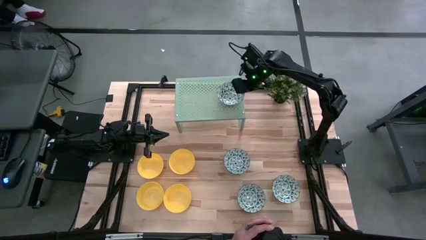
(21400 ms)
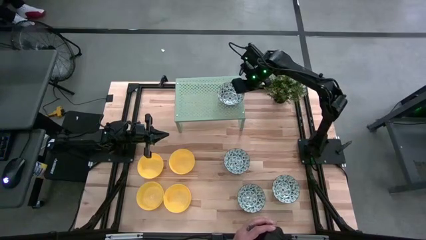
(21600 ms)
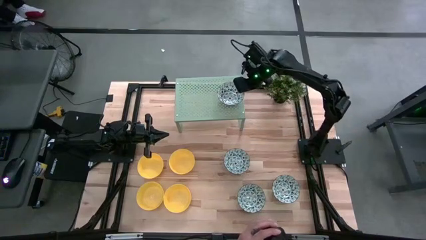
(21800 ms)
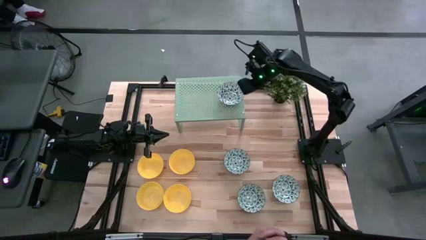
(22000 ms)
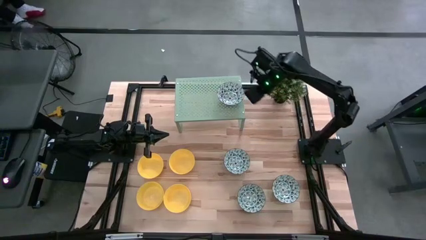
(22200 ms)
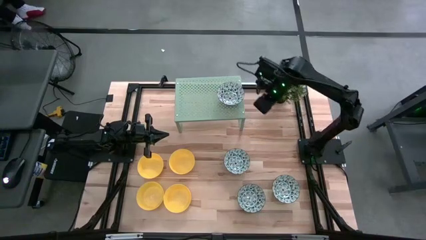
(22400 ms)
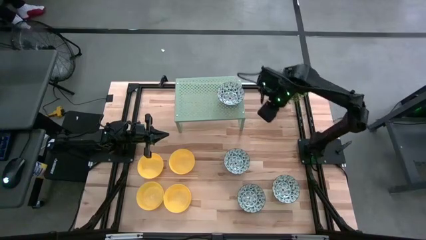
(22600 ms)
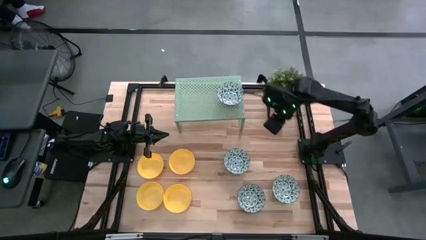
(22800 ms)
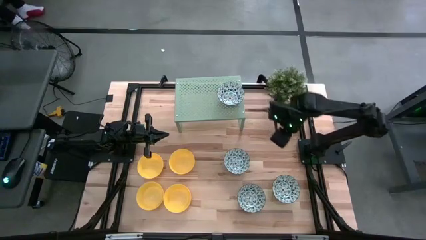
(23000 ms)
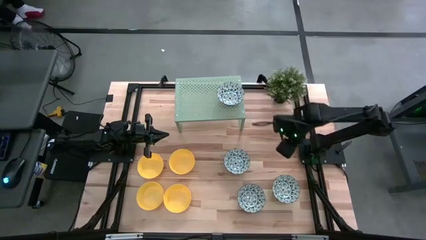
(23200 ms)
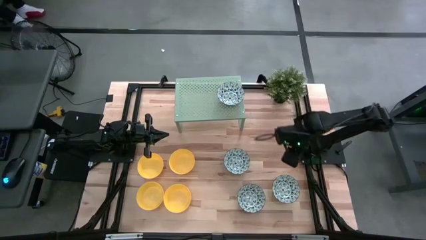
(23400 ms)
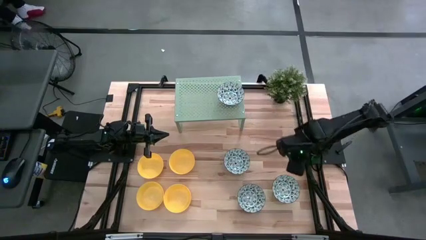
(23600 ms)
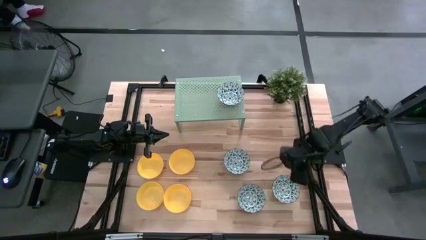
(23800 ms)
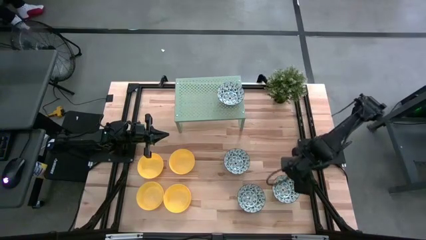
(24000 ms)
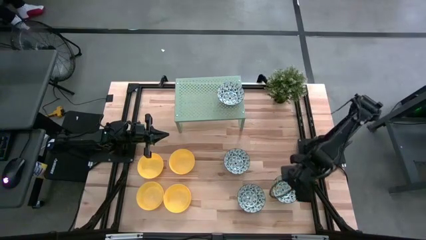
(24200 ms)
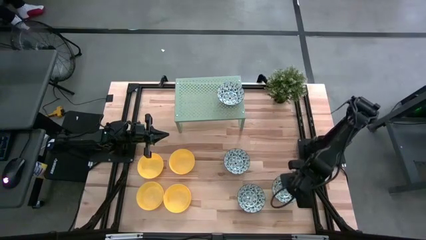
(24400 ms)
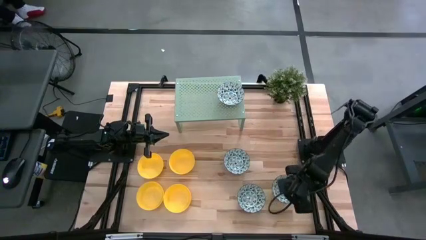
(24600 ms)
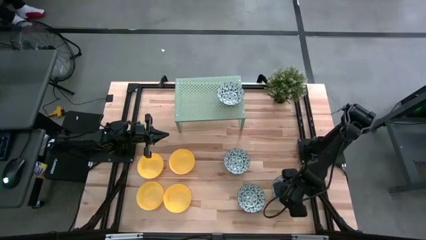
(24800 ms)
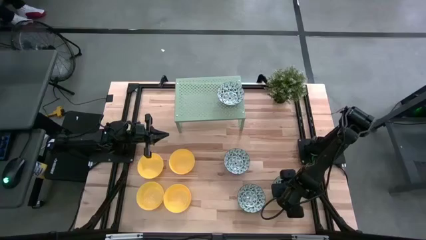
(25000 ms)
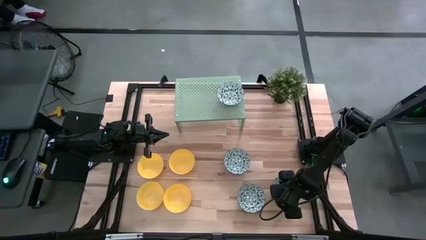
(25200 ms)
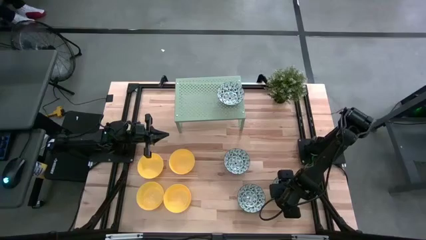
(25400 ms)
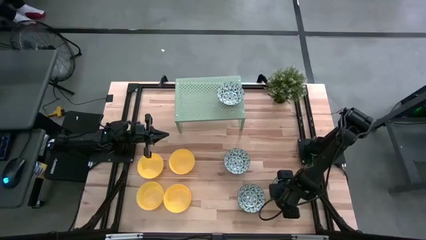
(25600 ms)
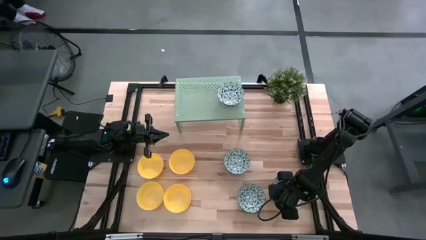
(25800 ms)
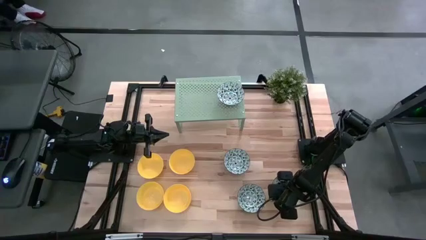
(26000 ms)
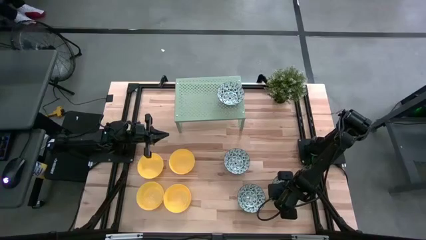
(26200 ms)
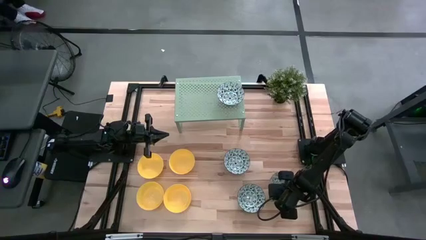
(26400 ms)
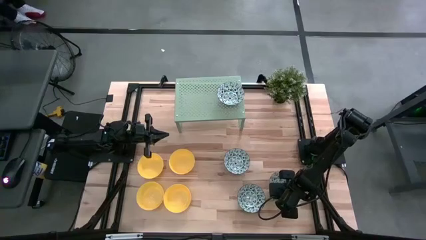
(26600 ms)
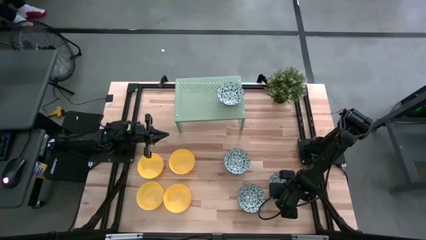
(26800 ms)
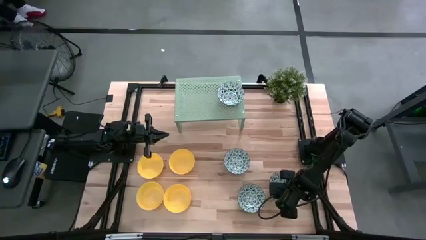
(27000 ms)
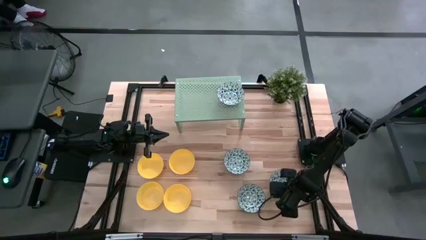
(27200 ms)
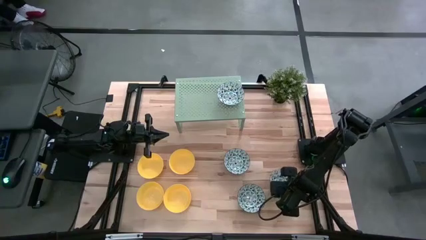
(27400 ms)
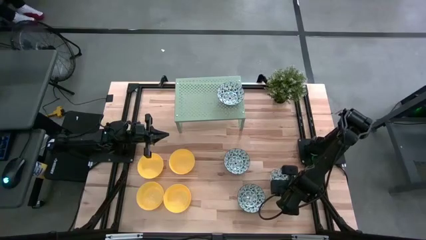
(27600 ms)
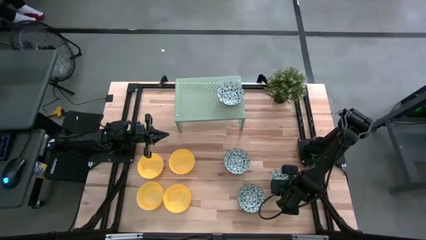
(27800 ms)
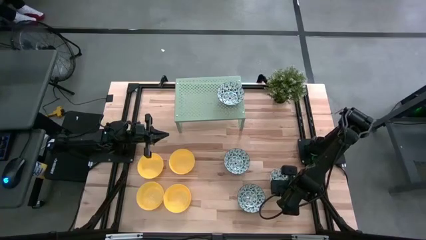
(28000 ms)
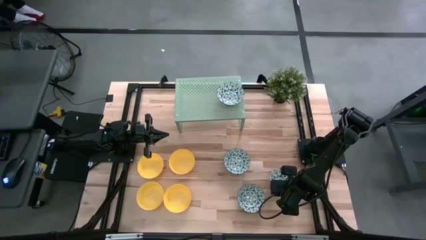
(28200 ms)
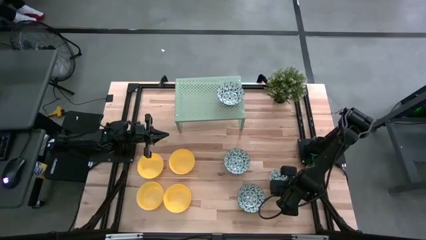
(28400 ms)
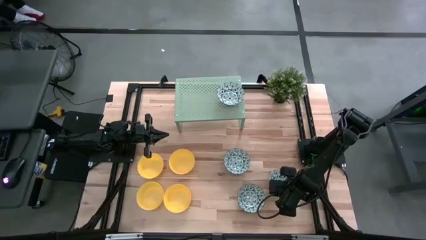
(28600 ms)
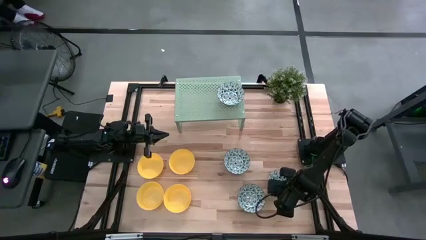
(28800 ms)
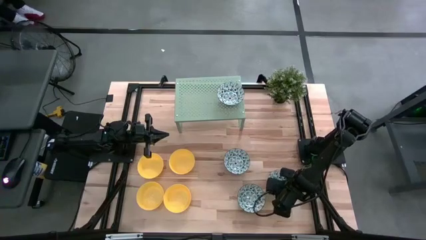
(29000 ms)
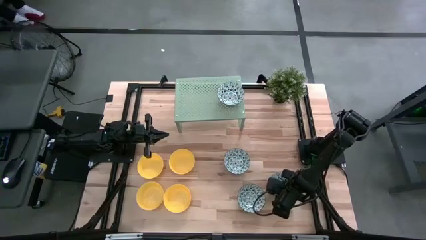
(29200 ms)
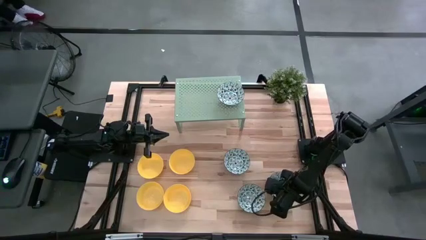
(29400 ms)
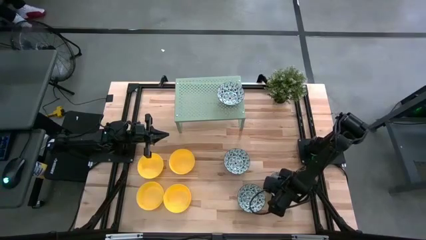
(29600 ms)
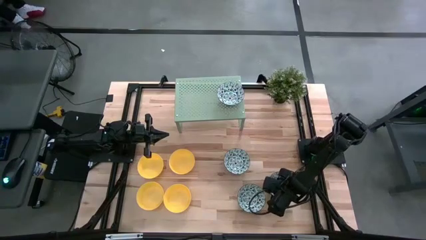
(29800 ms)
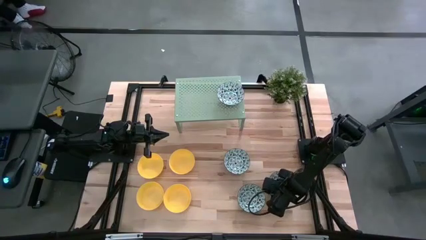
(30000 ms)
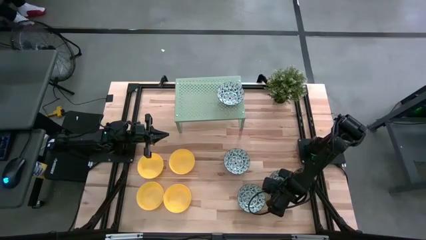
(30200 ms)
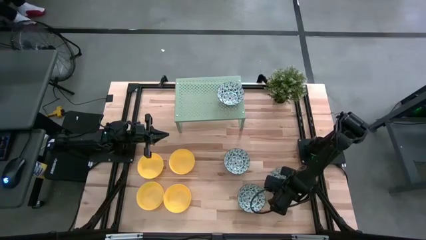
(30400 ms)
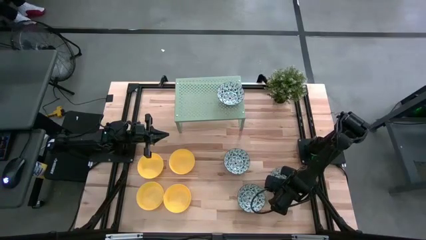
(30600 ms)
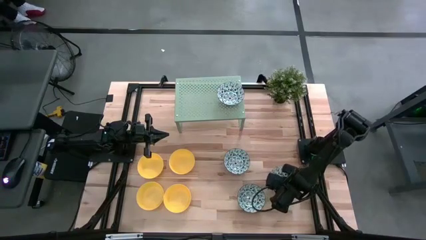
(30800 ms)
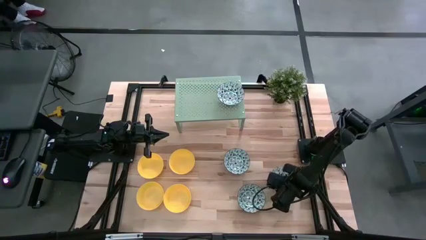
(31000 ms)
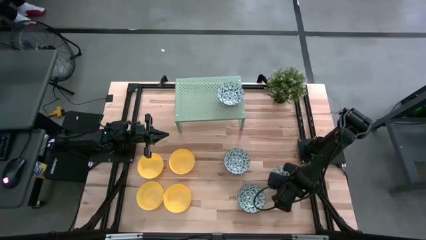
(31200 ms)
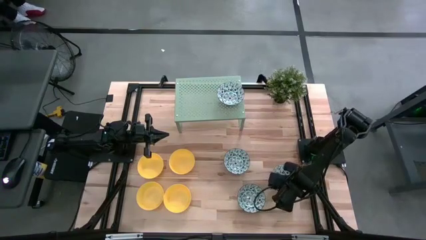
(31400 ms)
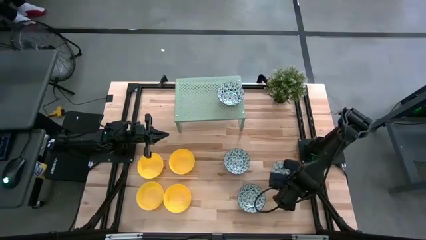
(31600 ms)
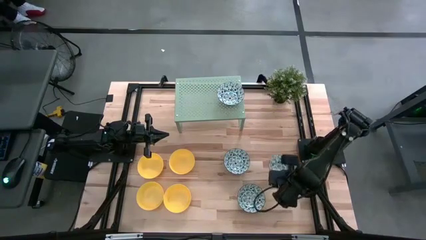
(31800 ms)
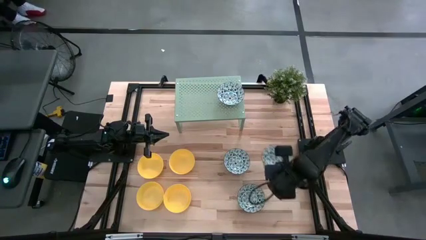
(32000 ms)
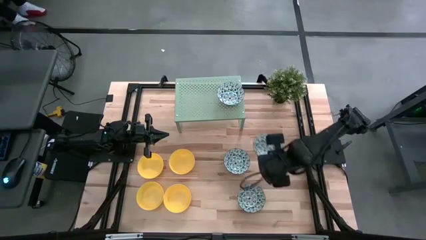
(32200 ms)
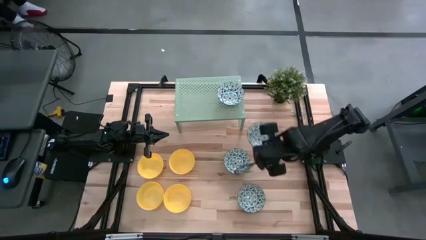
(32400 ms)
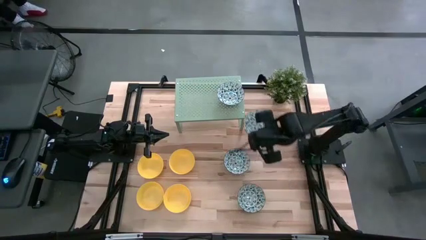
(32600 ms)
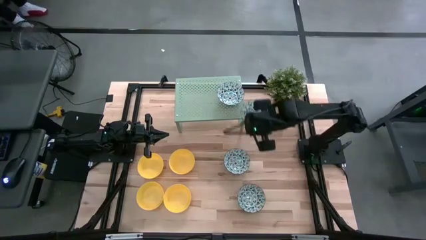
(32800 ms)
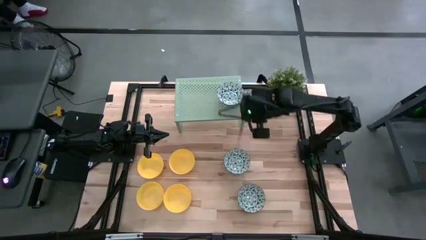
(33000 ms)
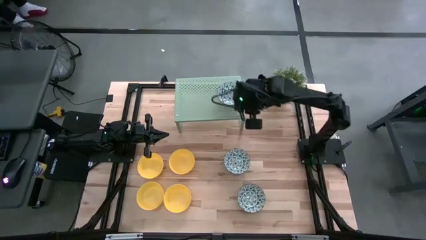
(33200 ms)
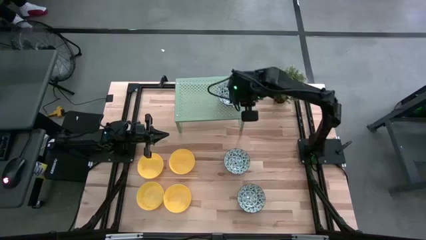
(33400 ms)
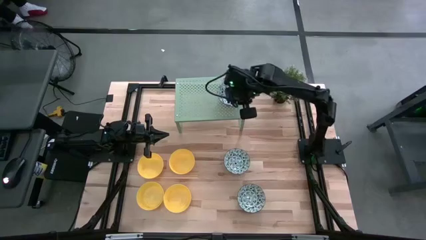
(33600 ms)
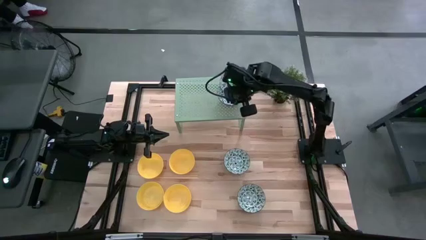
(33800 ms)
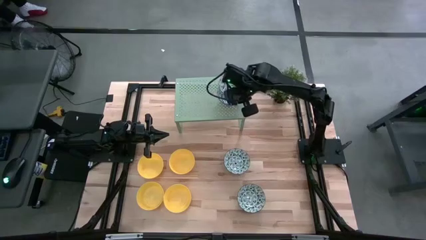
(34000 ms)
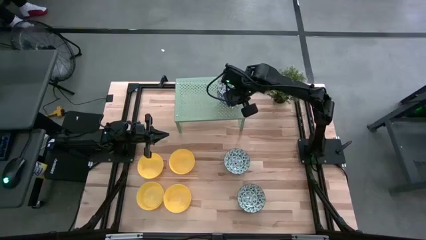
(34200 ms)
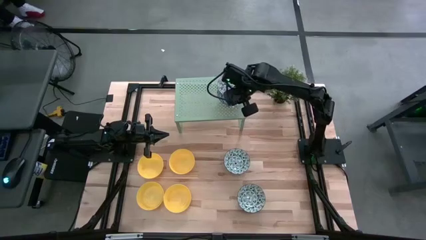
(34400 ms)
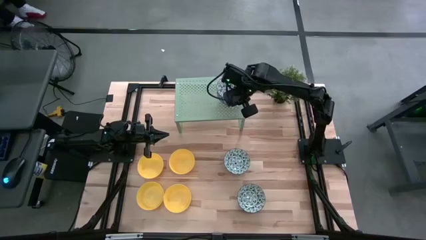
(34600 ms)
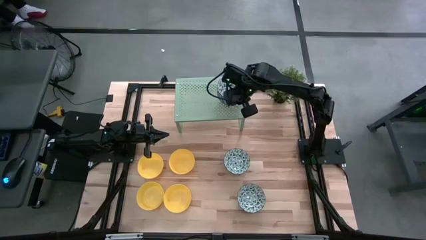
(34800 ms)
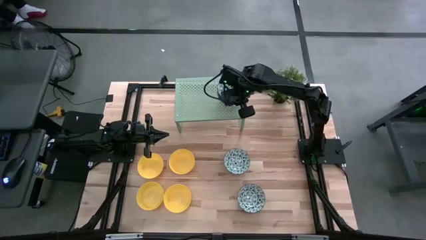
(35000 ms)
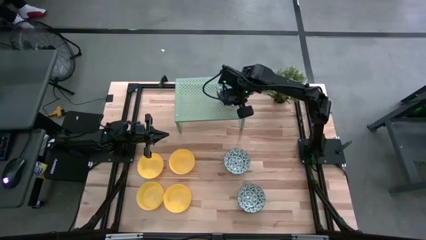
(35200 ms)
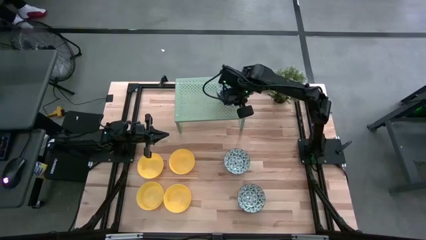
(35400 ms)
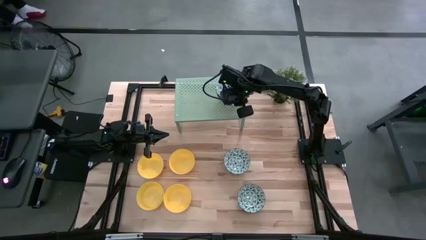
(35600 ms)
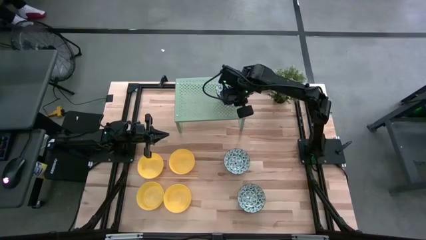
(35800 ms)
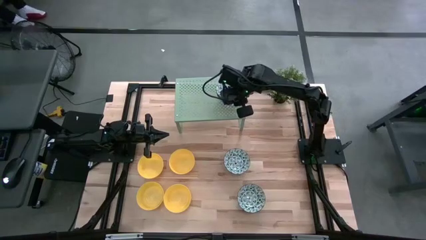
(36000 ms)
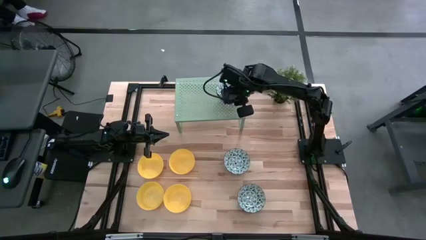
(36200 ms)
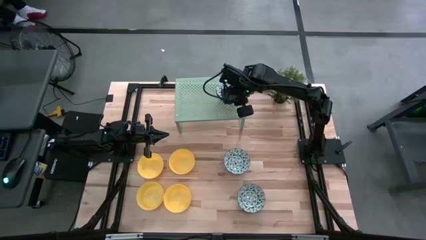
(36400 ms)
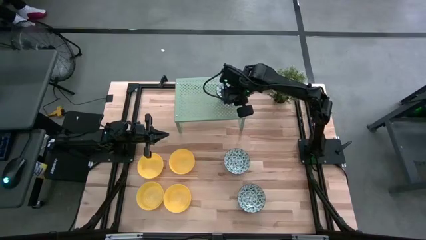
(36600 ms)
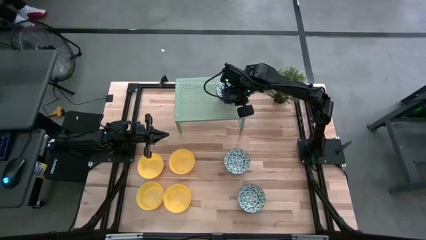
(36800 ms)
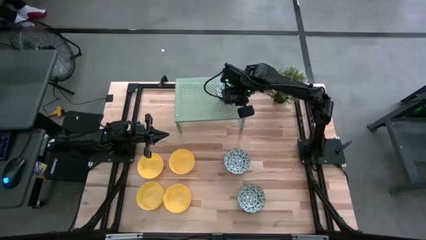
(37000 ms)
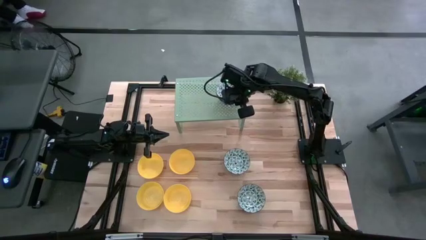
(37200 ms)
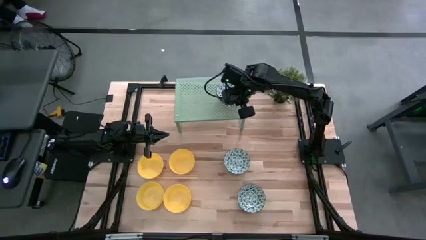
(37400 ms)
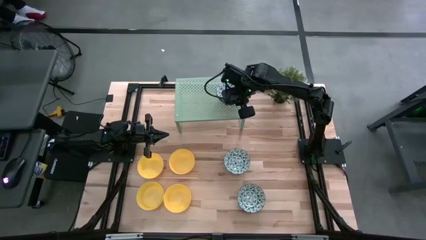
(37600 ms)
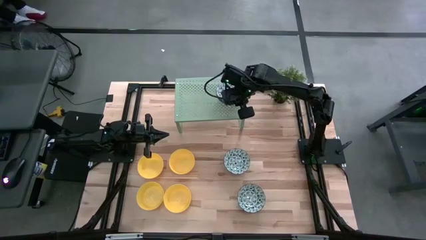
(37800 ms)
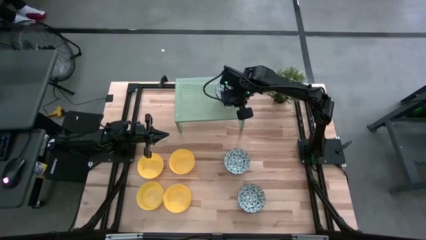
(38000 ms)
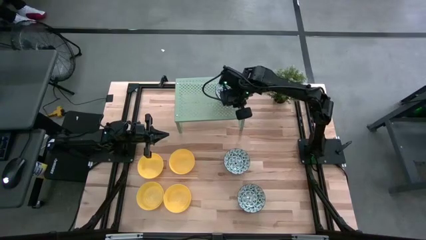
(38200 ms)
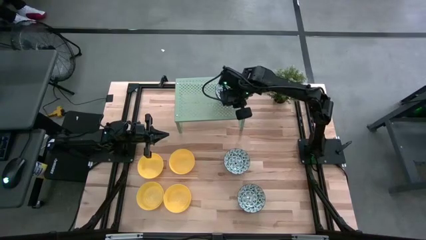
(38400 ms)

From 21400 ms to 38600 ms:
Task: Pick & Place Mini bowls
Stack the blue patterned bowl on top of the other blue patterned bowl on the shelf
